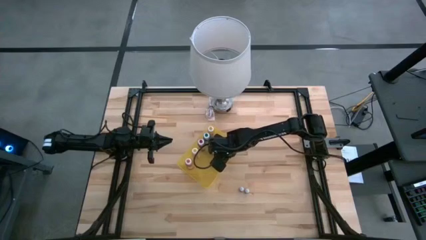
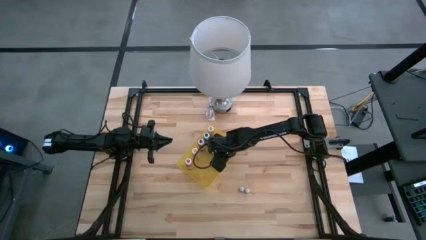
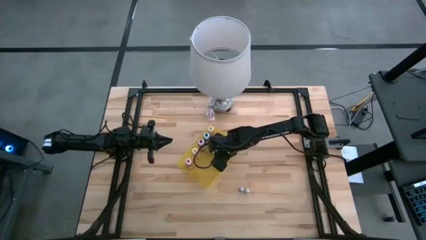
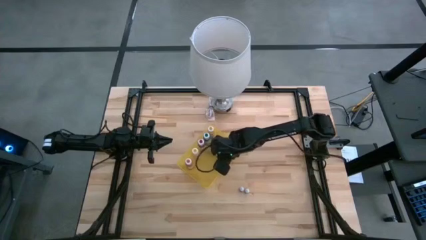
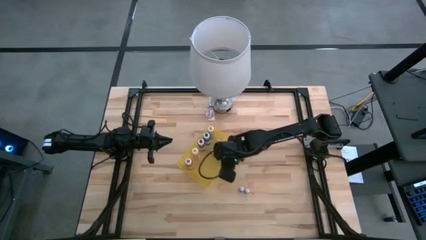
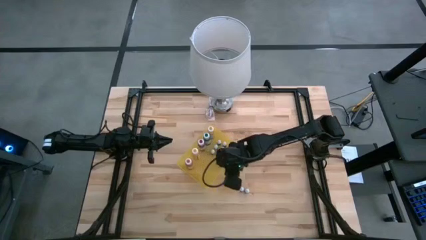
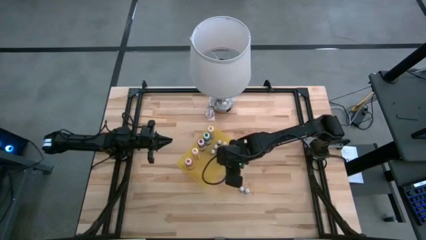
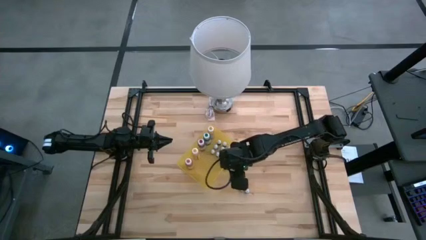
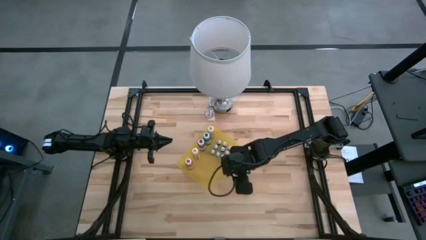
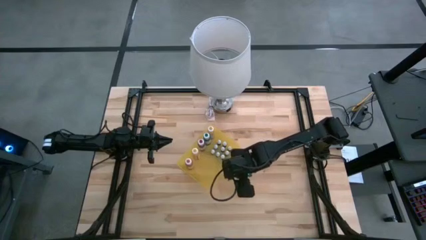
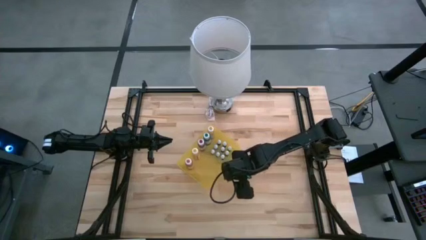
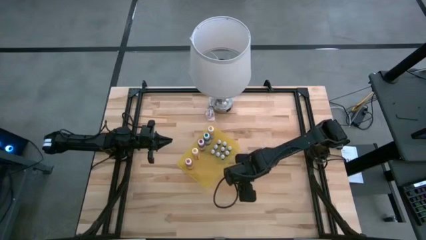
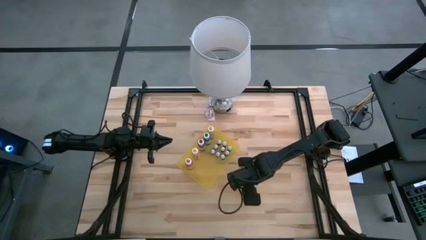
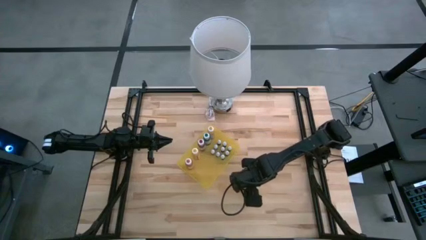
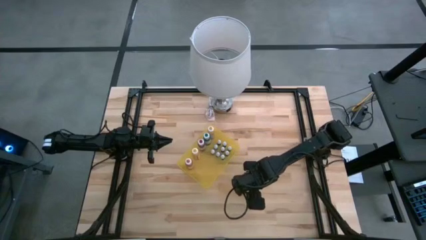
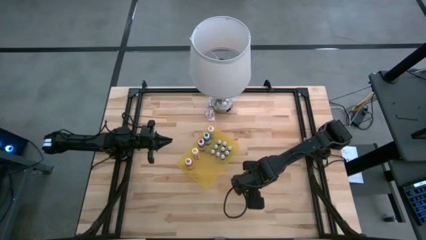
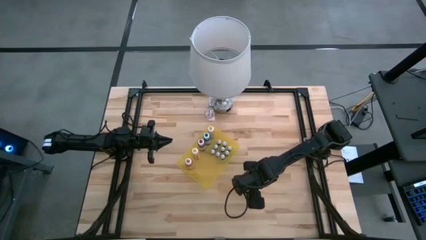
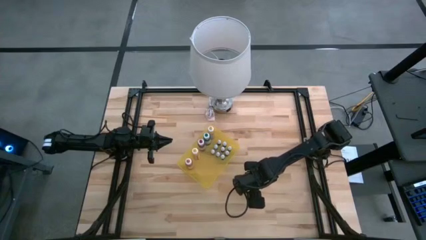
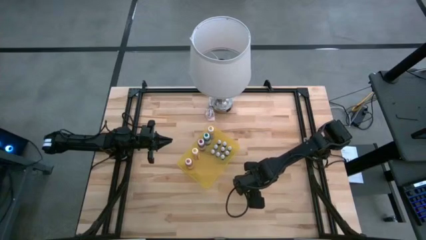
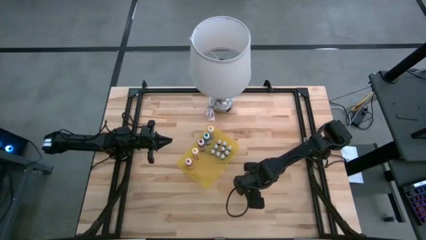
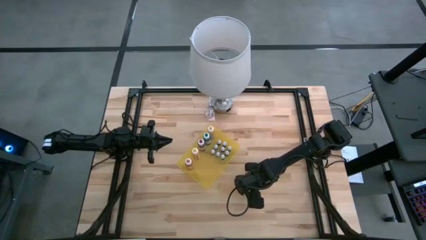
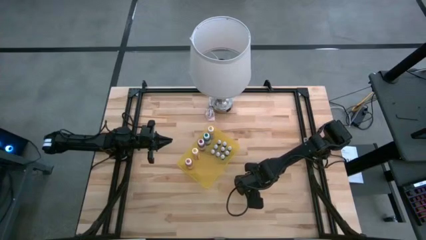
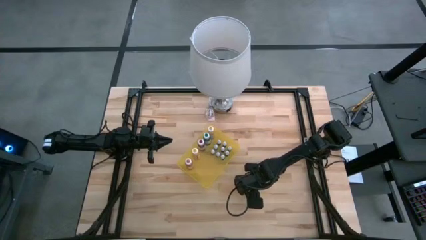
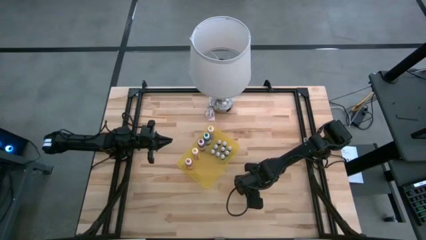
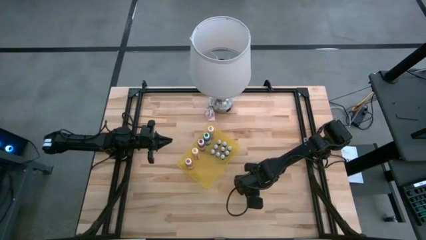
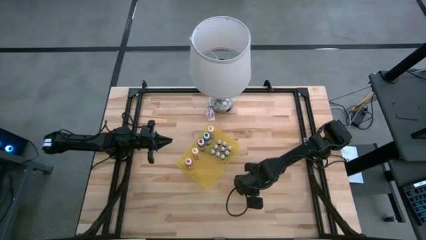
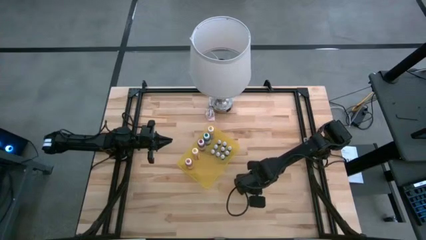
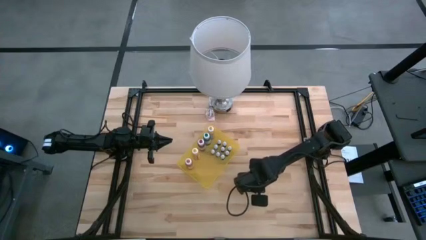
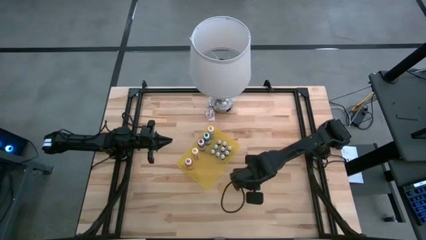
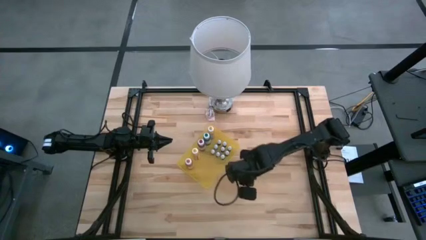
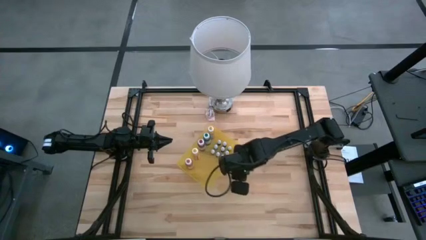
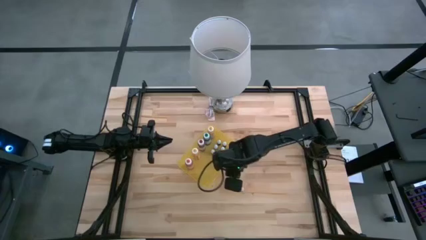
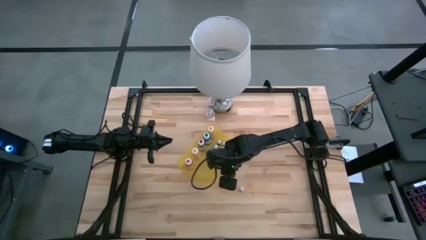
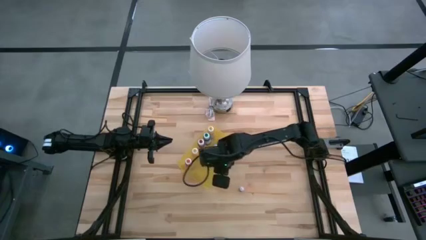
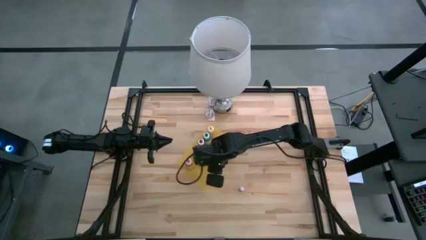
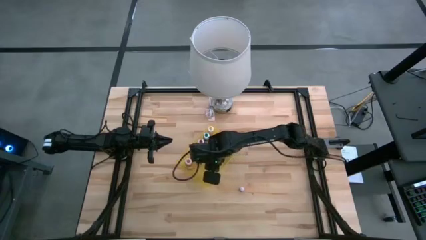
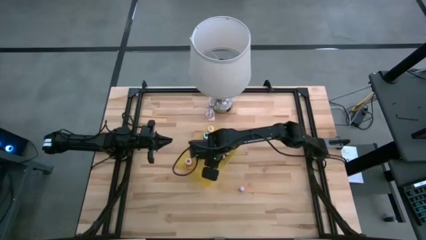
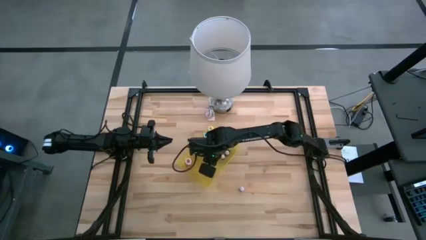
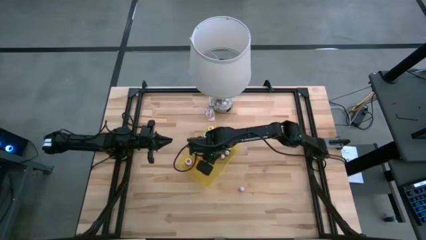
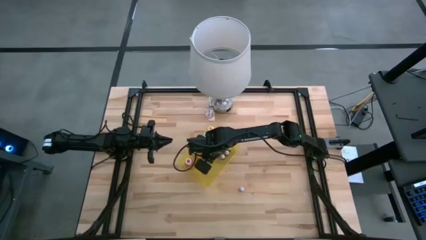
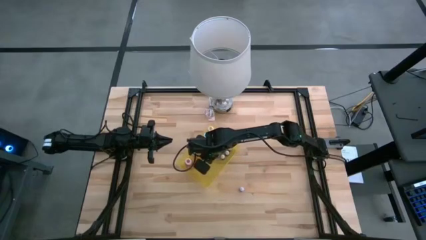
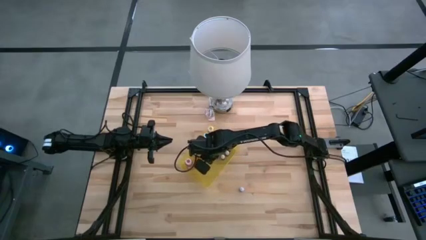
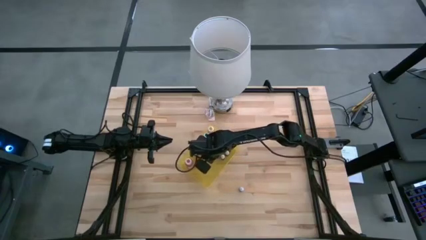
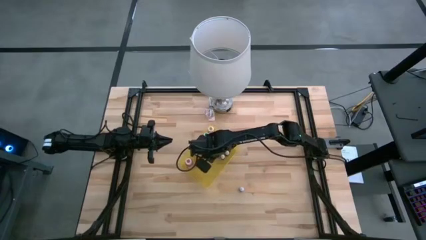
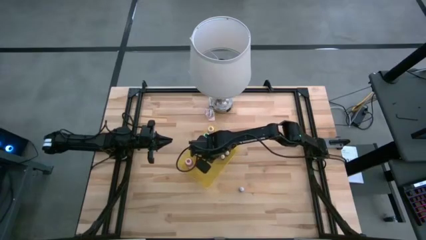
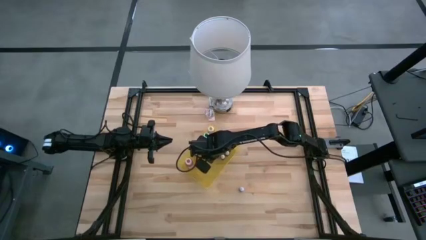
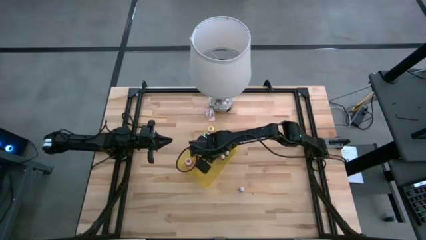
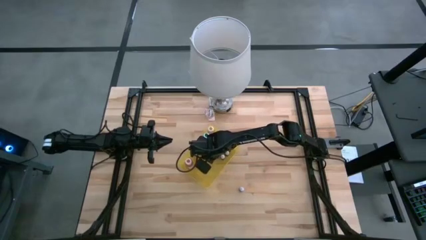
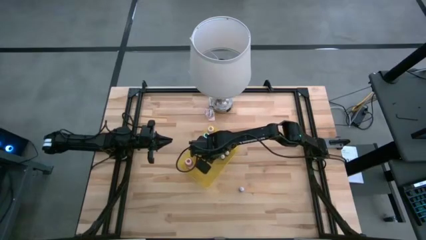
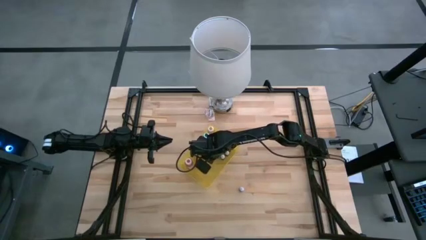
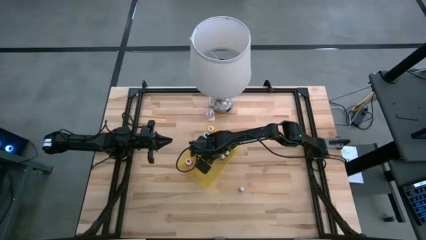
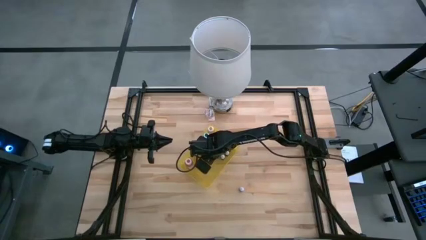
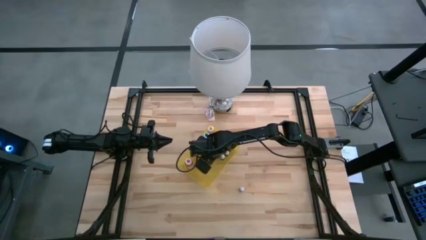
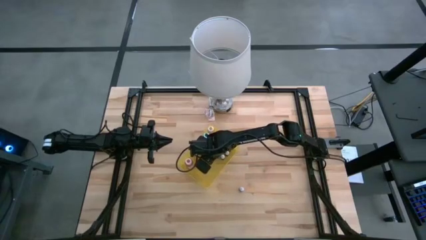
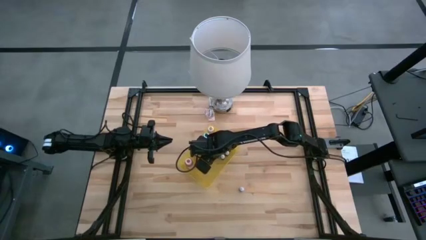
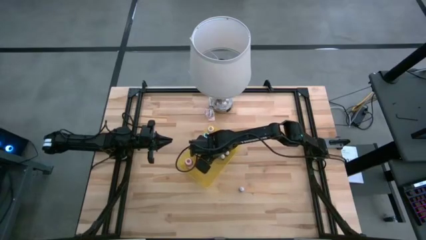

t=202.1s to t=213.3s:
Task: Pick & Place food coloring
Put the small right red food coloring bottle into the yellow bin

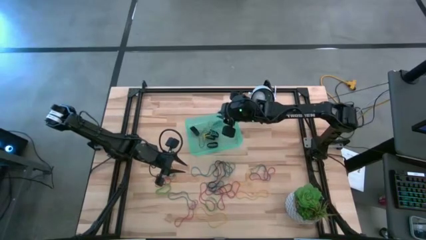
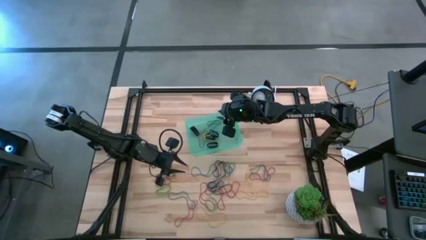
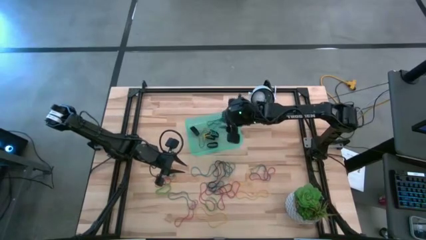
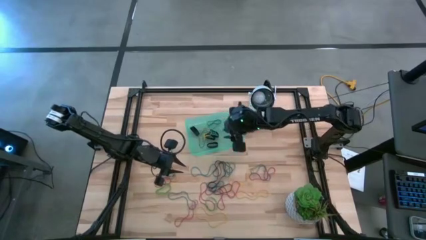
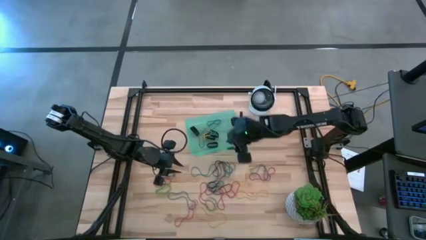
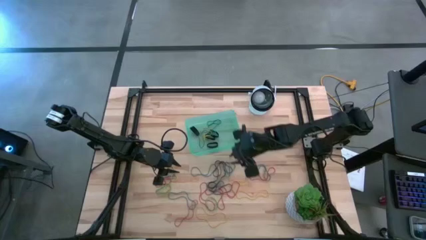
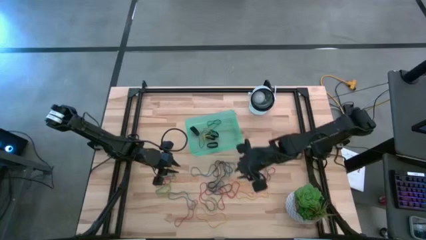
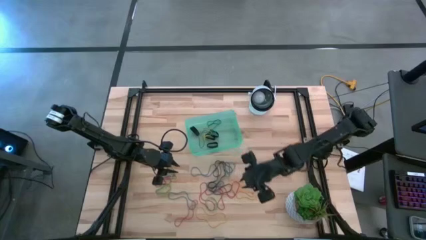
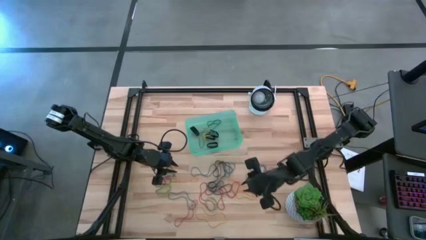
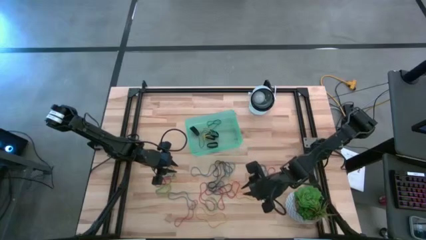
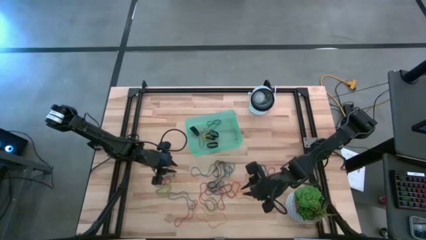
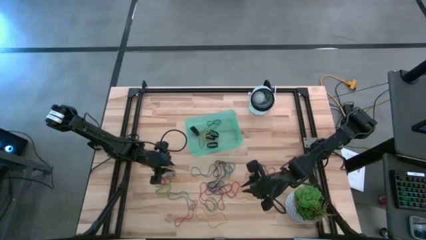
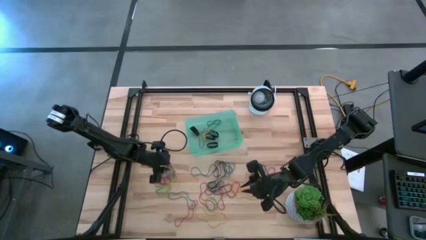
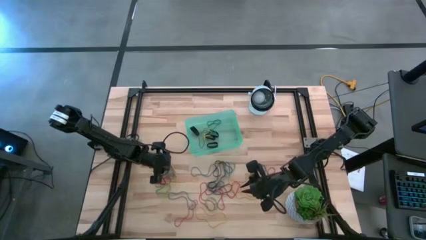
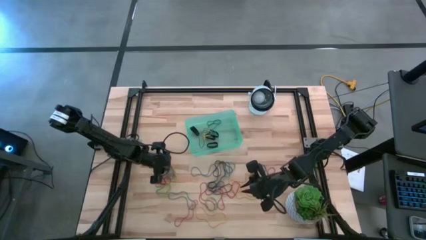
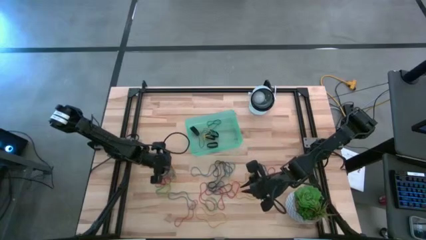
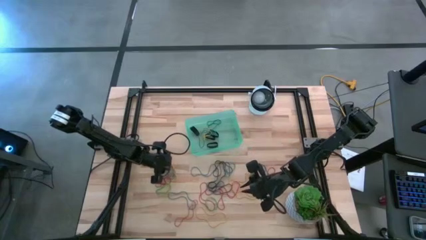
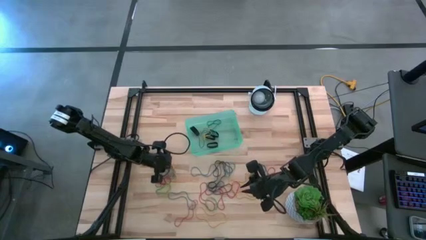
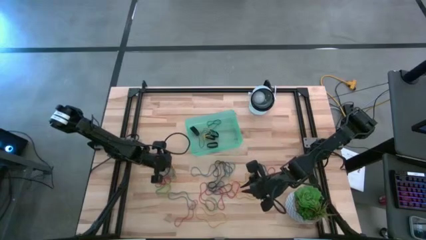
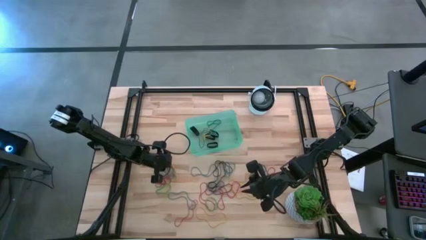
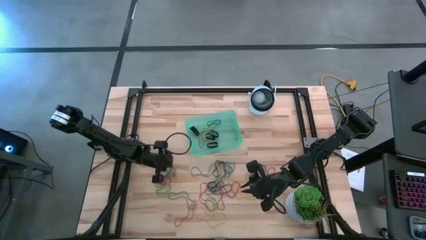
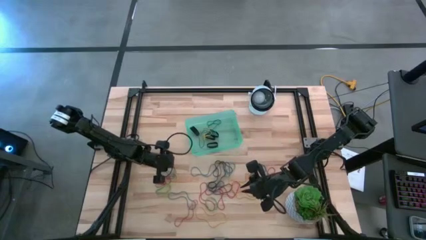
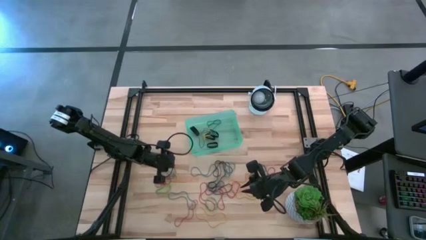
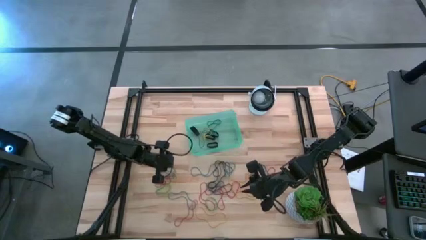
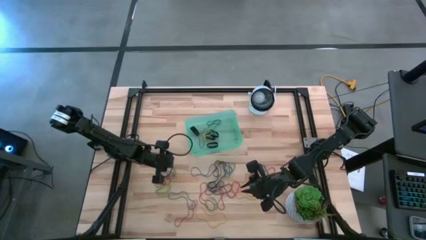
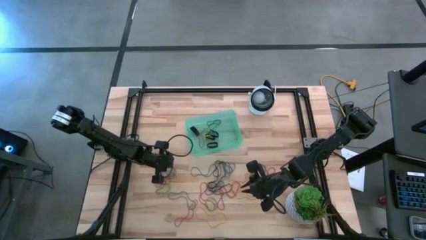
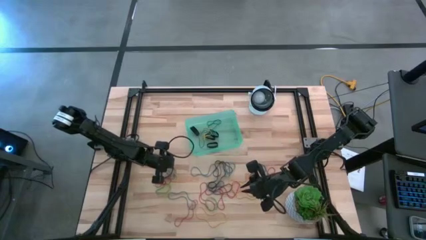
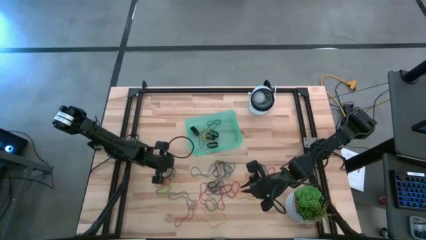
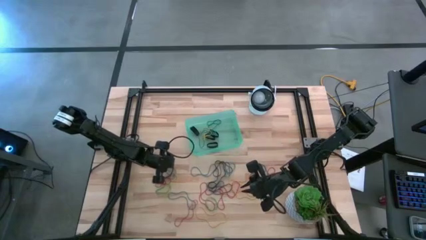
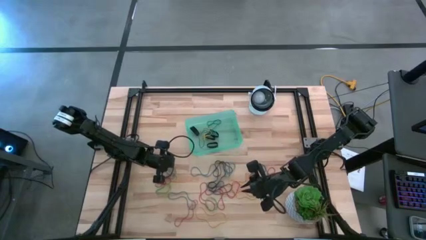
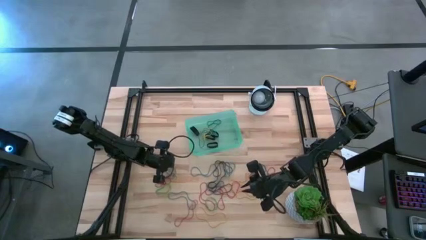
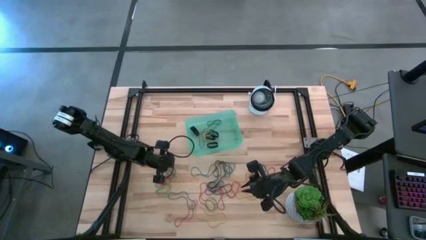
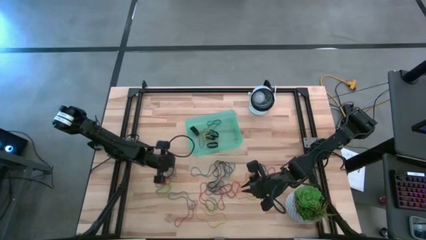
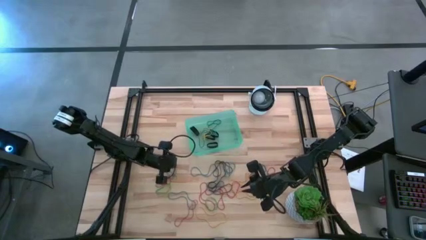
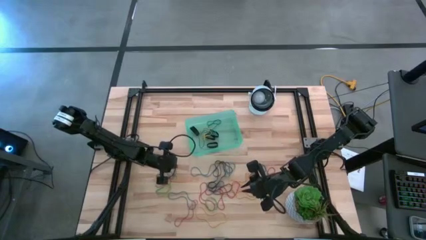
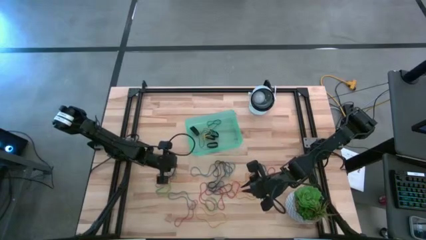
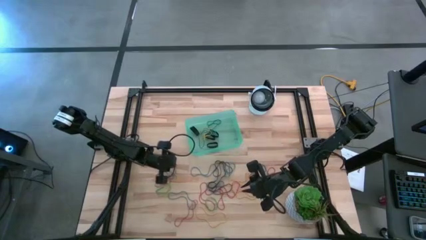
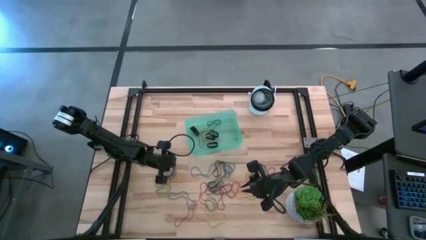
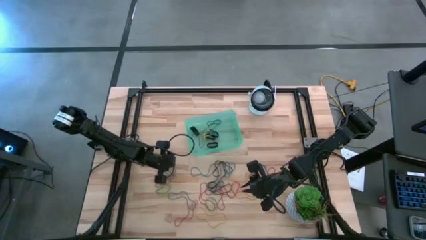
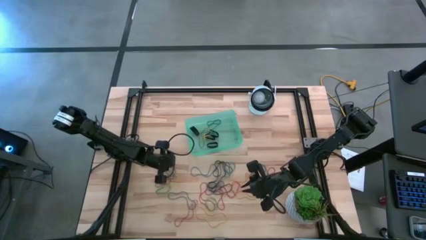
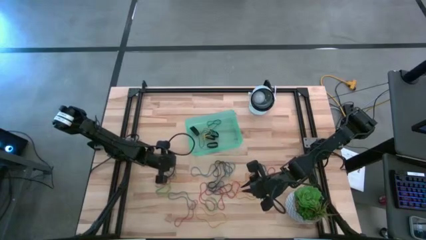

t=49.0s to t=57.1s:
Task: Pick and place rubber bands into bin
Put the blue rubber band into the green bin
